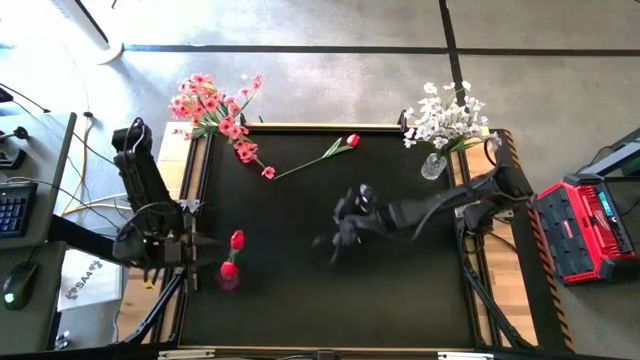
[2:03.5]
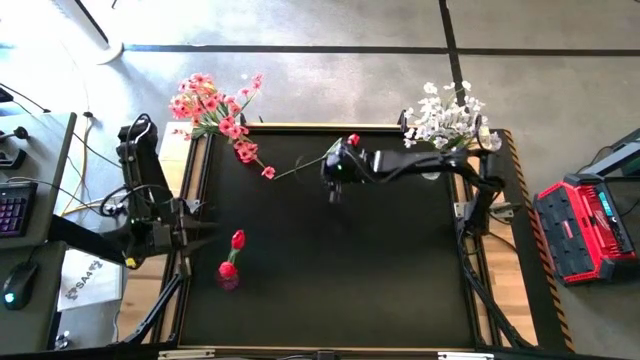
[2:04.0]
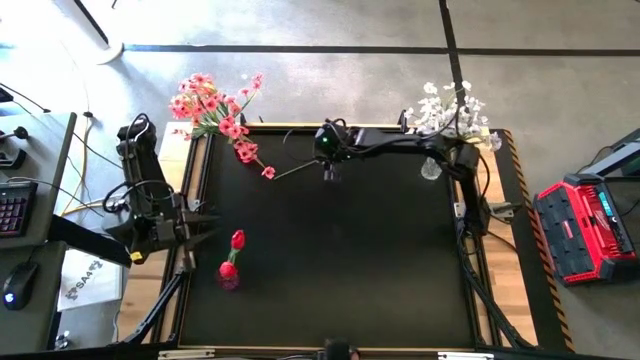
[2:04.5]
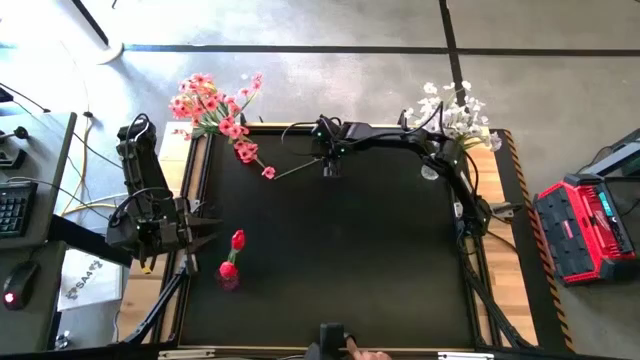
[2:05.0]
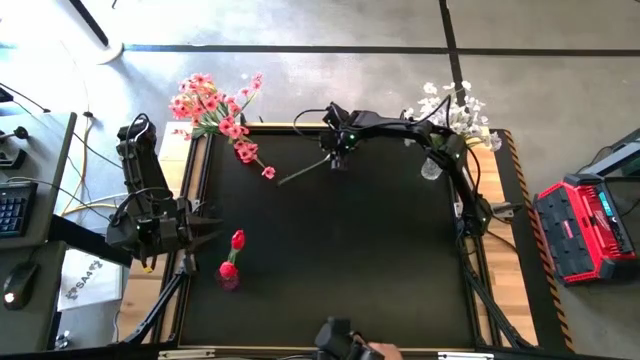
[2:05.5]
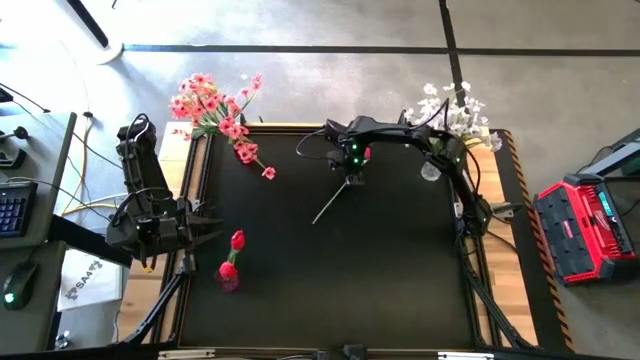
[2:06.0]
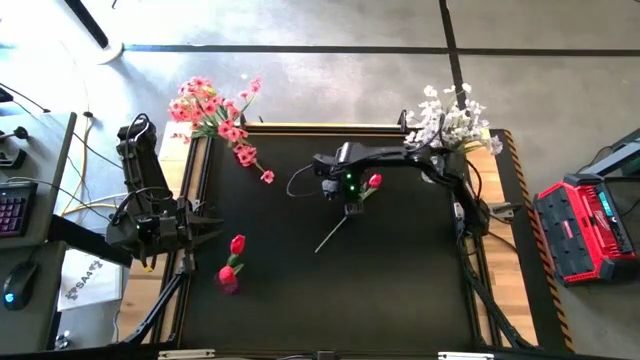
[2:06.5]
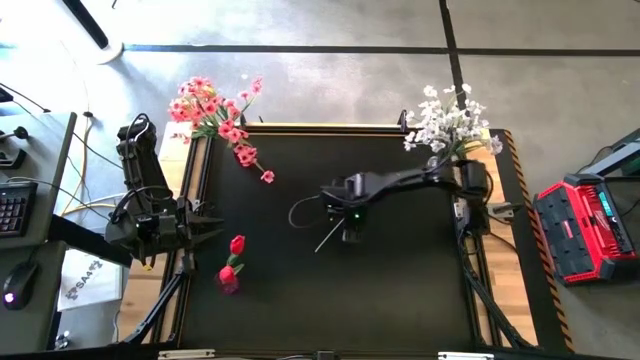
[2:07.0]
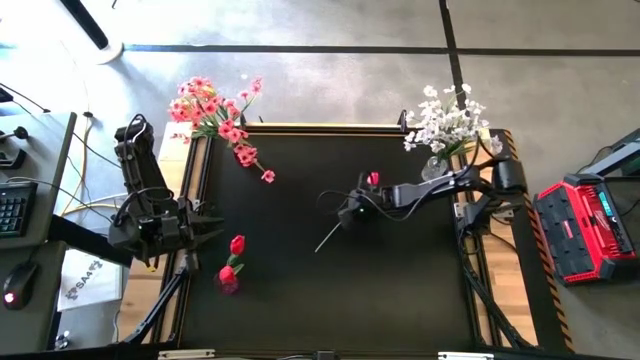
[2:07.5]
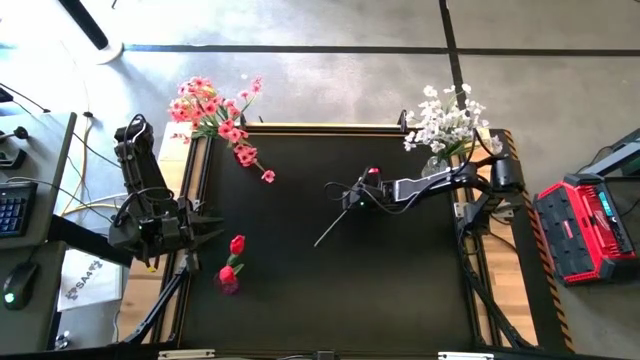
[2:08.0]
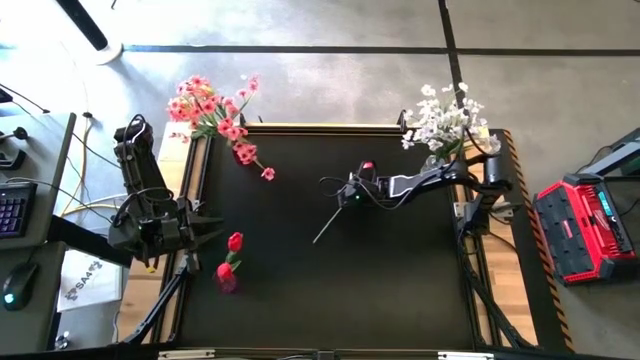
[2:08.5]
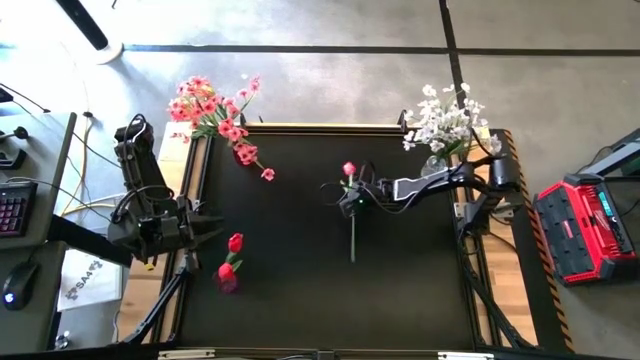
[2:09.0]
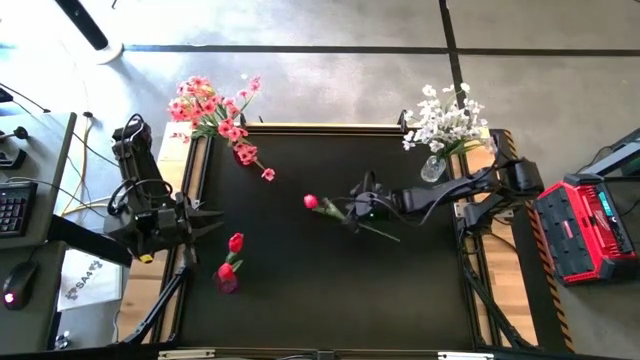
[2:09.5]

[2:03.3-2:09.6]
Task: Sort flowers into vase by color
Put the red flower into the violet vase

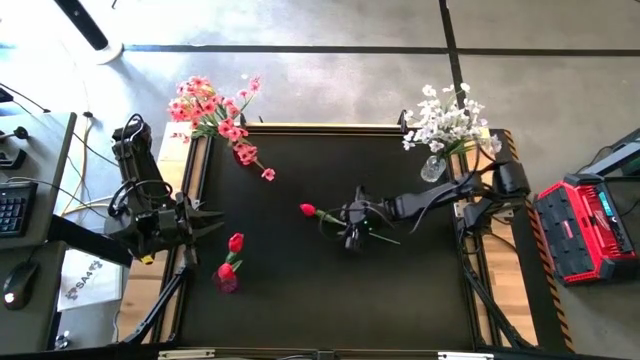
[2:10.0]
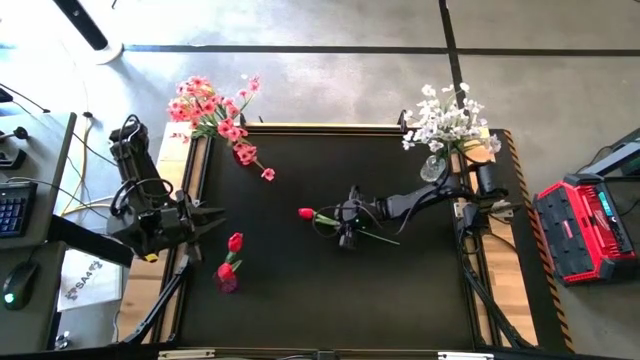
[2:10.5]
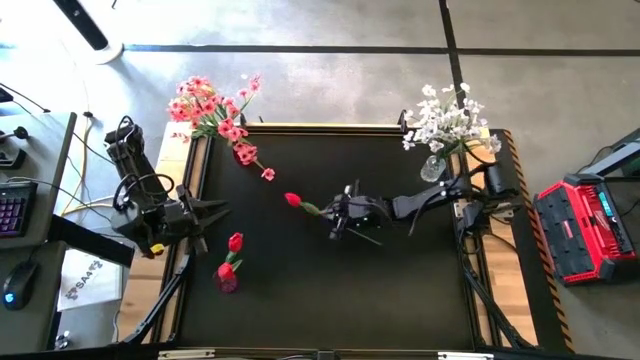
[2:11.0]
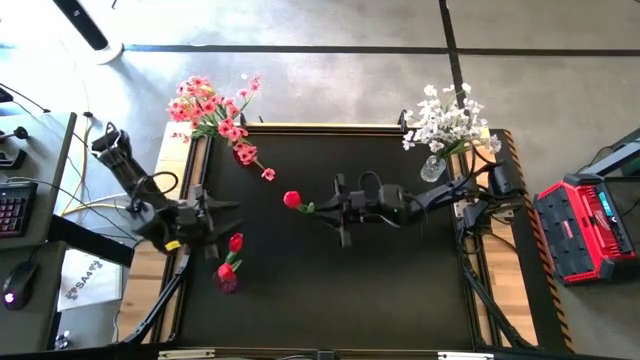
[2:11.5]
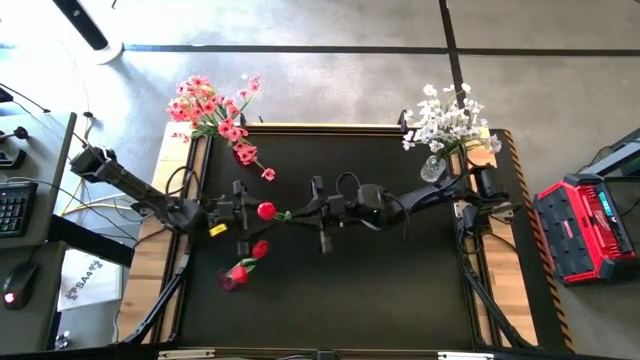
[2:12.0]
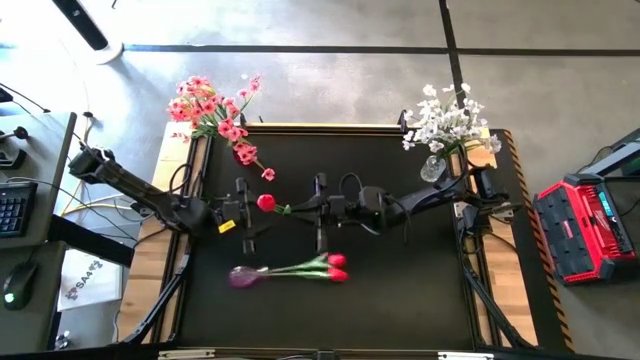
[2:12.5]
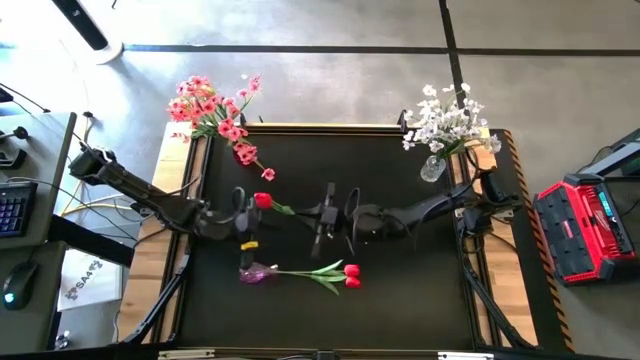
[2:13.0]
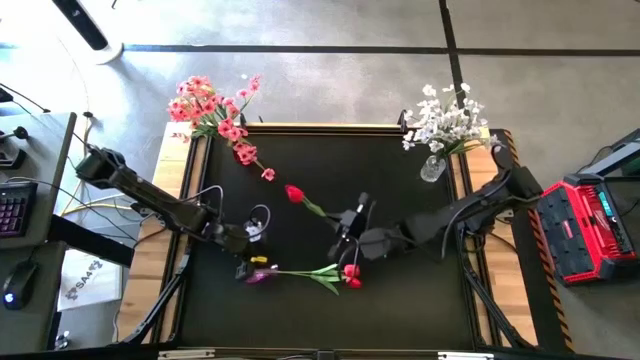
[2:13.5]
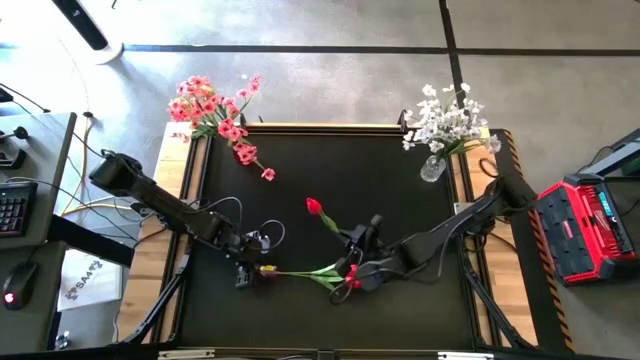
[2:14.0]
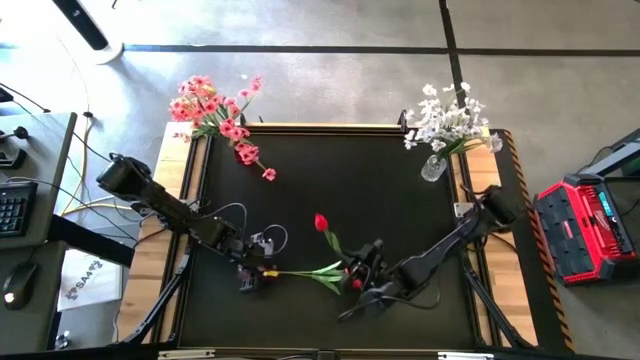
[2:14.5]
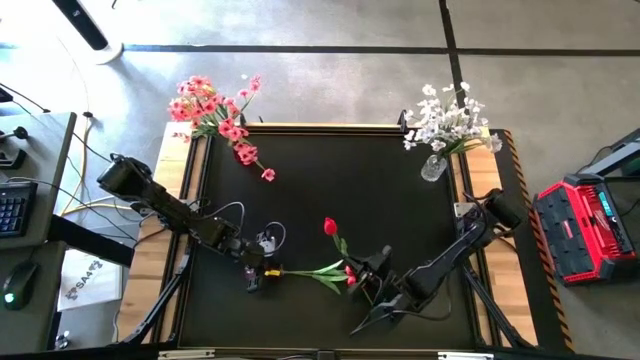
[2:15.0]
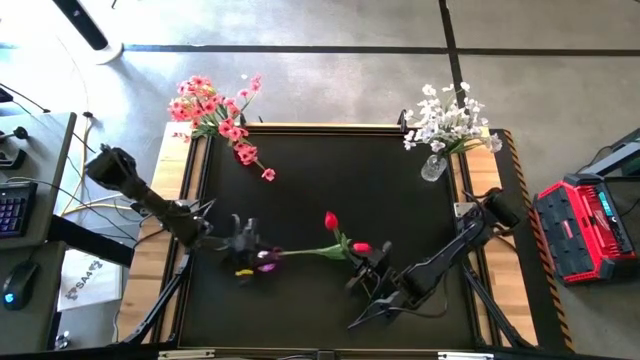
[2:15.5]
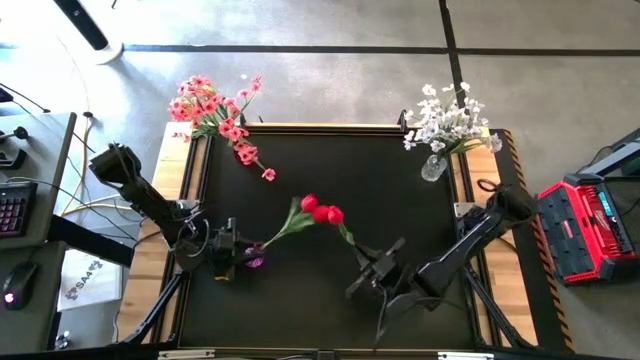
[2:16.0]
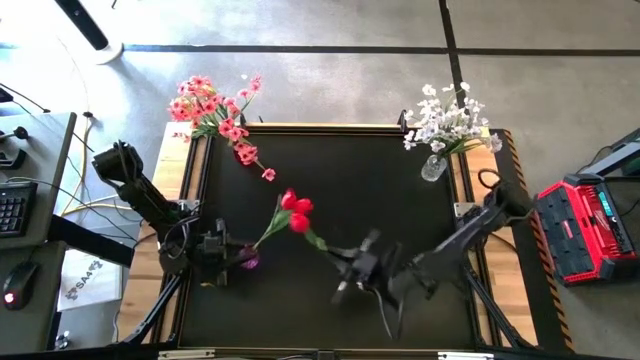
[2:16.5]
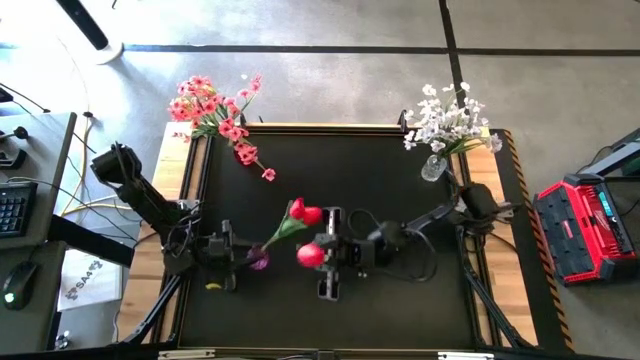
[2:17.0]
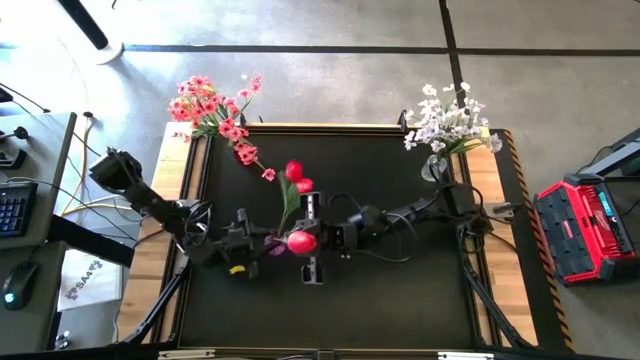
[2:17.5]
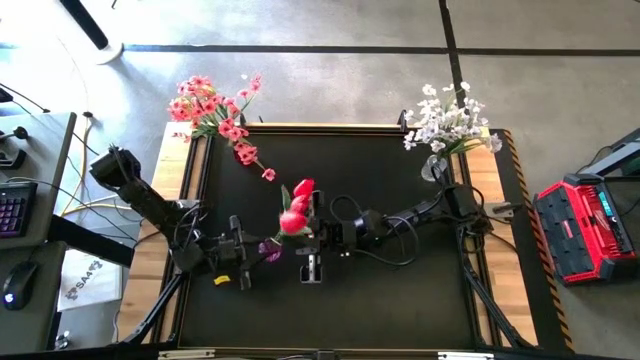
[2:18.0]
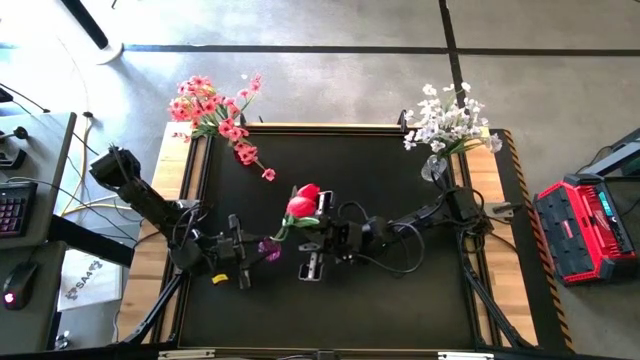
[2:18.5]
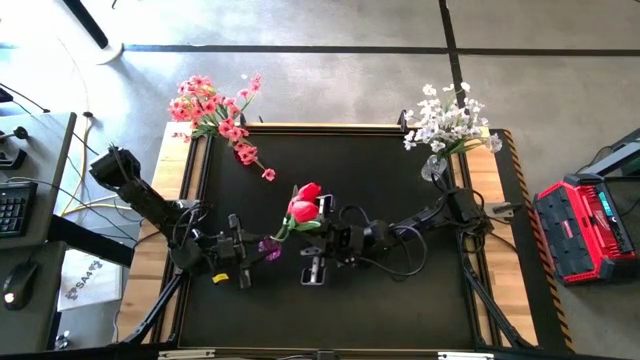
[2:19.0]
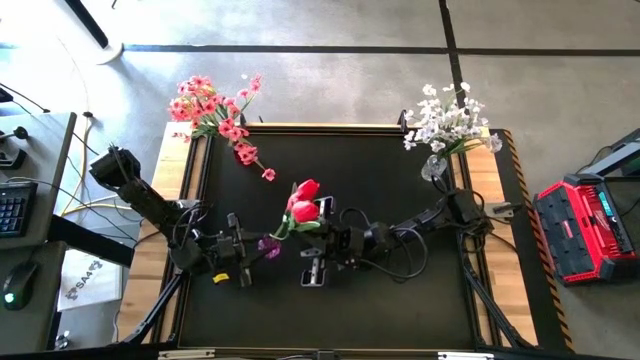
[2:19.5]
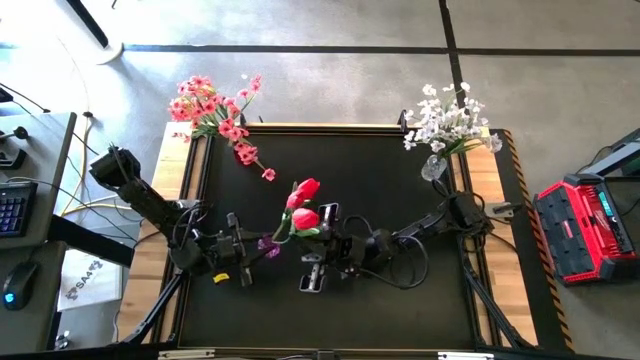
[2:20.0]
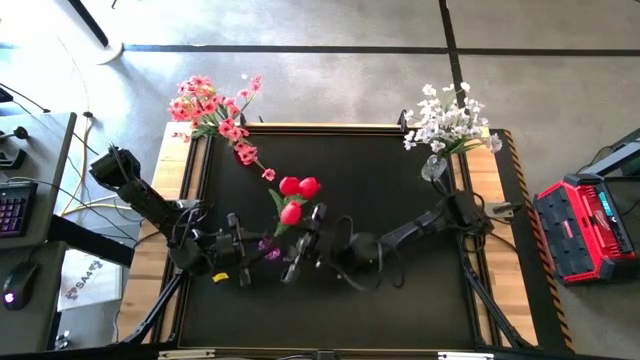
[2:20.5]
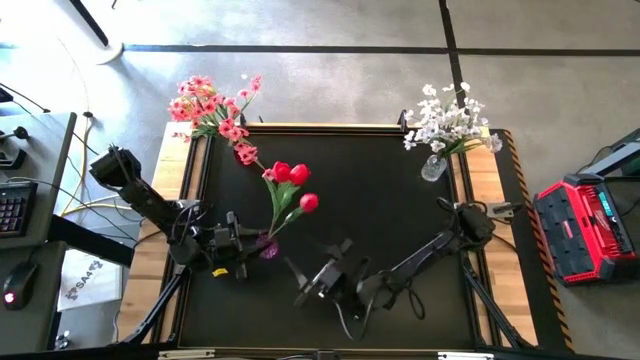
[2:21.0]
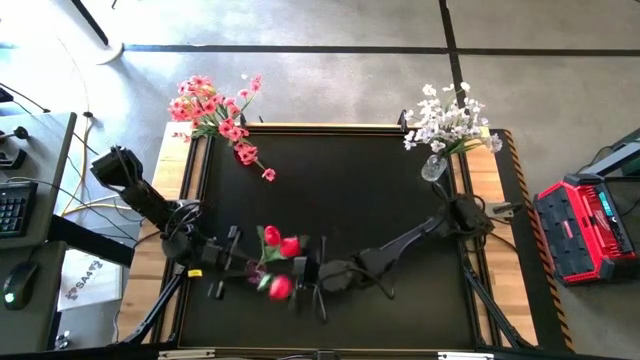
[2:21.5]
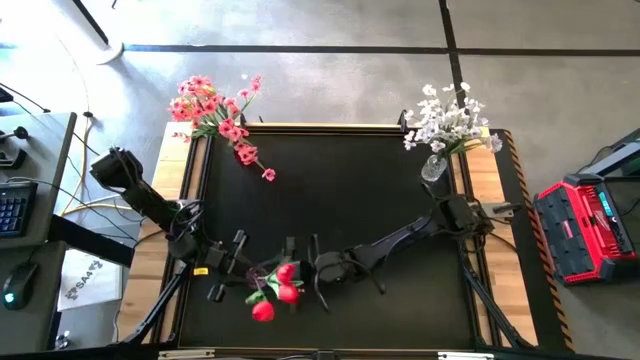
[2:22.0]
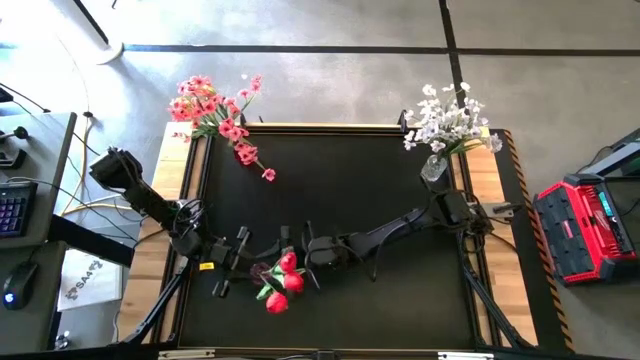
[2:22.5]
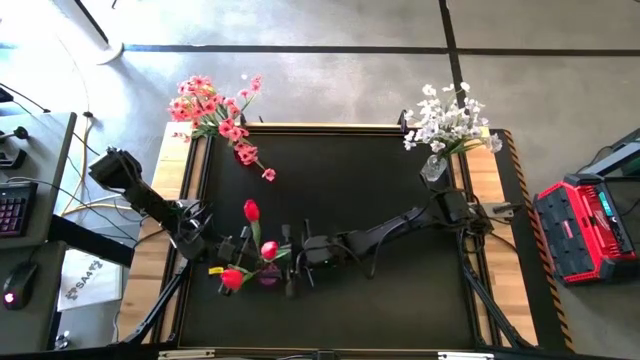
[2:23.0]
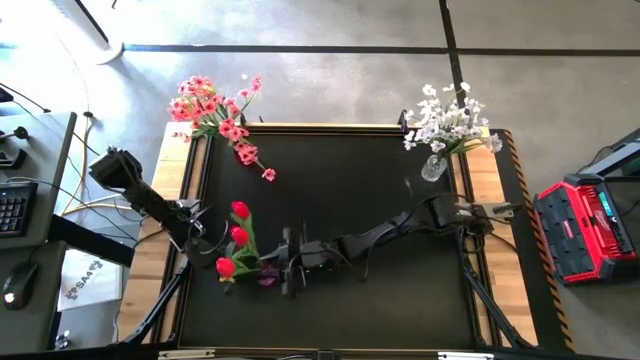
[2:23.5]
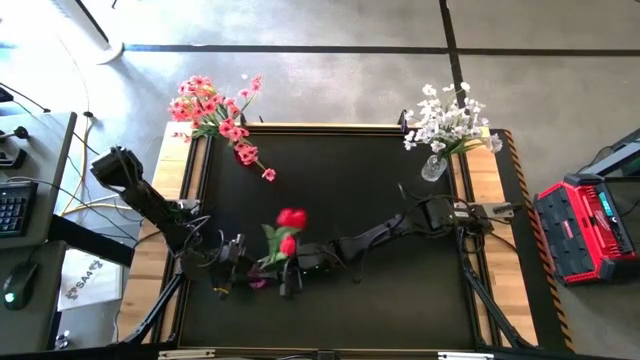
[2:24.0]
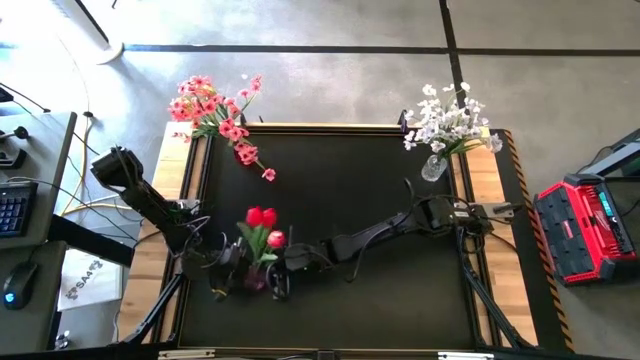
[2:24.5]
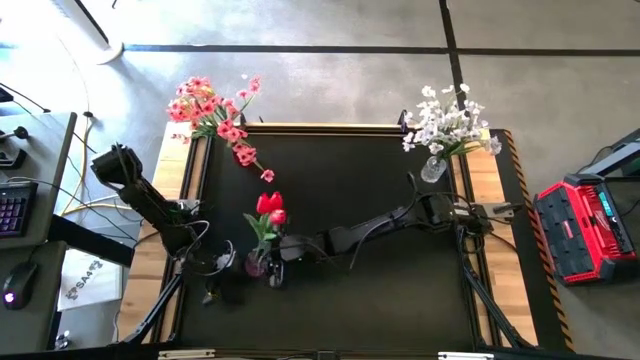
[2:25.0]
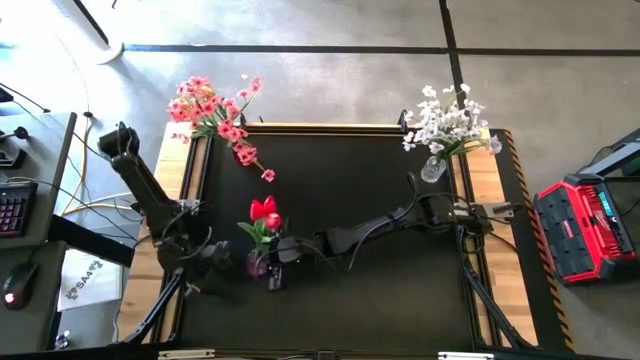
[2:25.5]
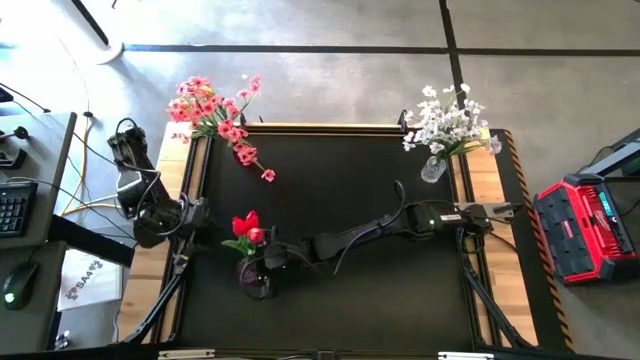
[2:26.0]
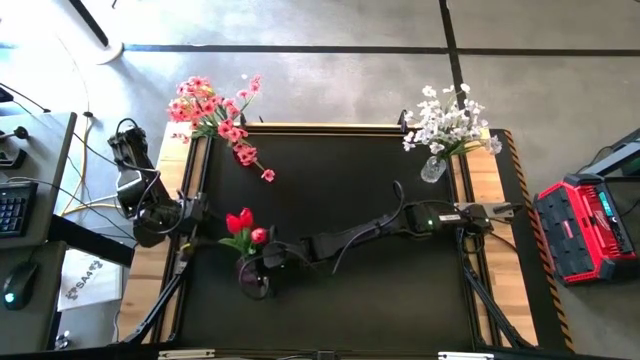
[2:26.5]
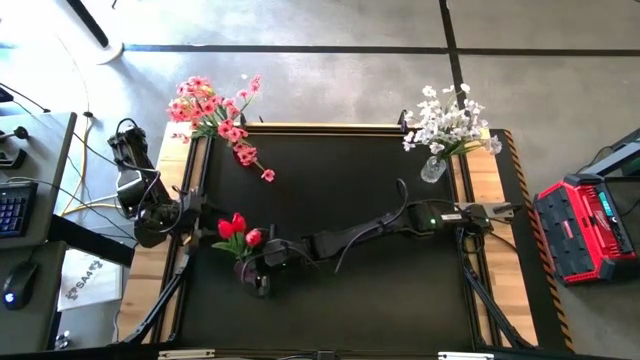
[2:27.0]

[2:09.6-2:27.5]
Put the red flower into the violet vase
